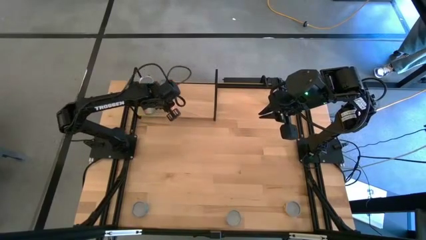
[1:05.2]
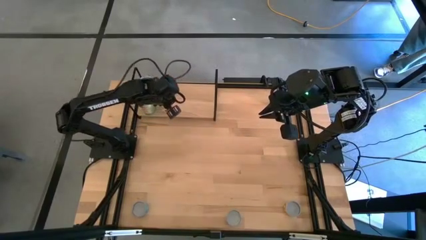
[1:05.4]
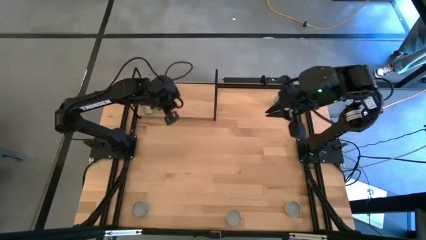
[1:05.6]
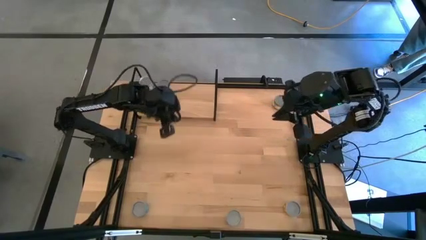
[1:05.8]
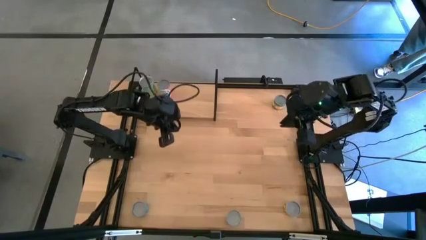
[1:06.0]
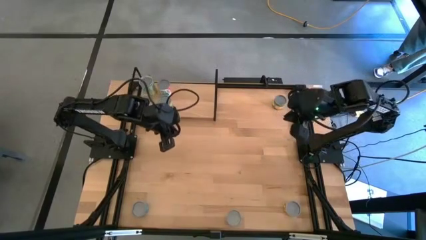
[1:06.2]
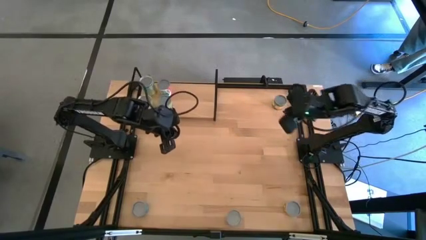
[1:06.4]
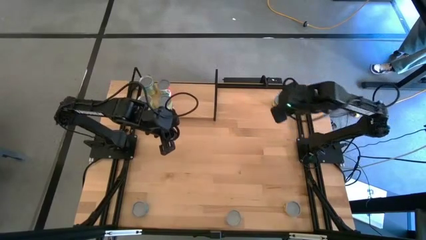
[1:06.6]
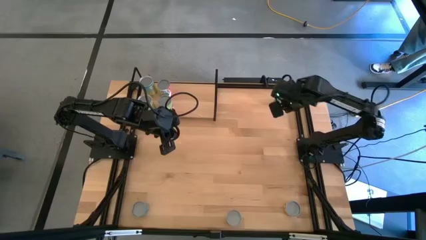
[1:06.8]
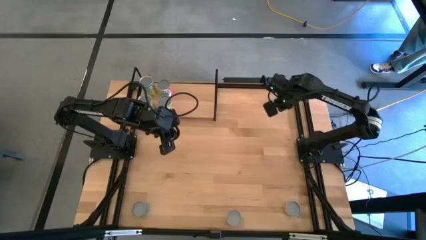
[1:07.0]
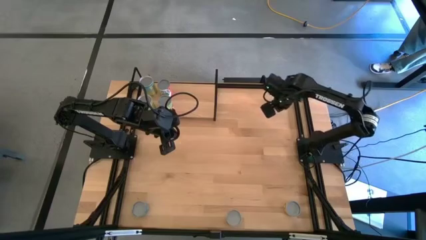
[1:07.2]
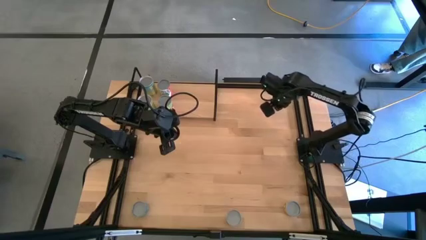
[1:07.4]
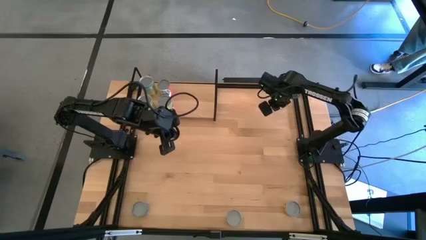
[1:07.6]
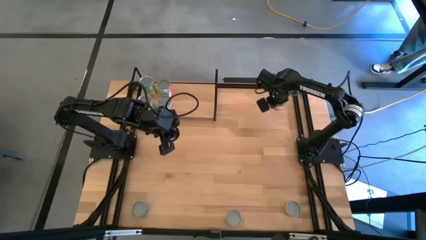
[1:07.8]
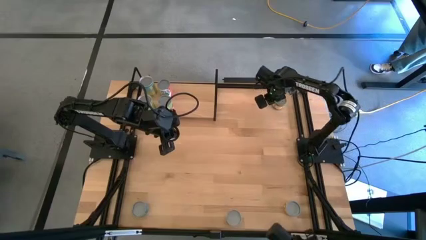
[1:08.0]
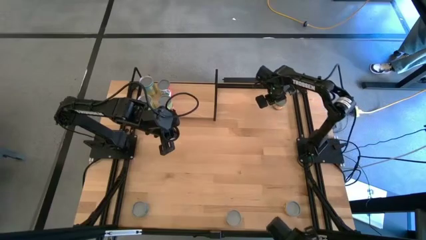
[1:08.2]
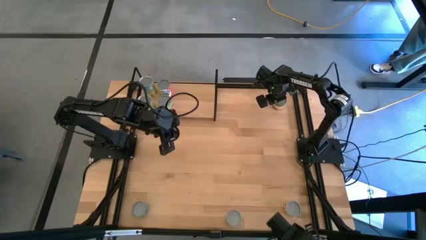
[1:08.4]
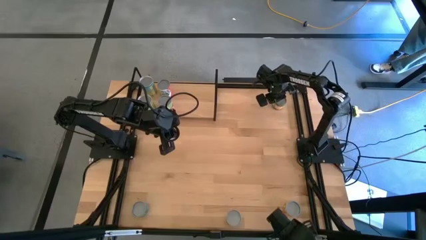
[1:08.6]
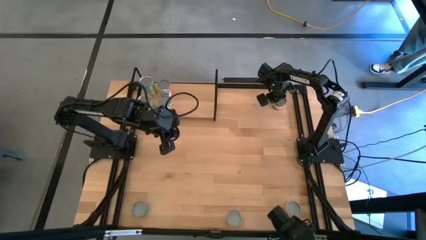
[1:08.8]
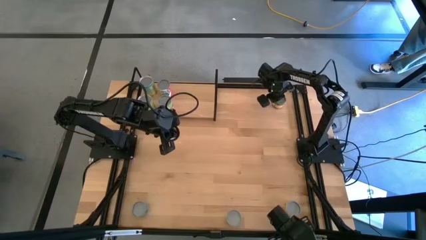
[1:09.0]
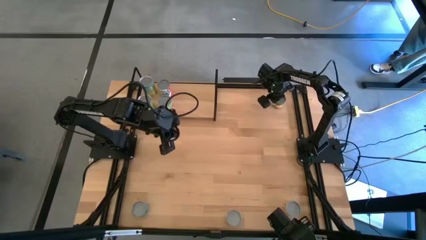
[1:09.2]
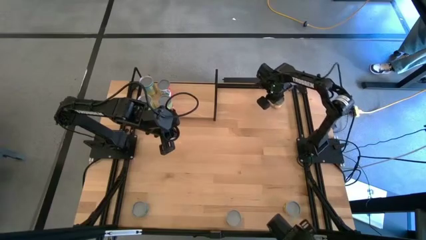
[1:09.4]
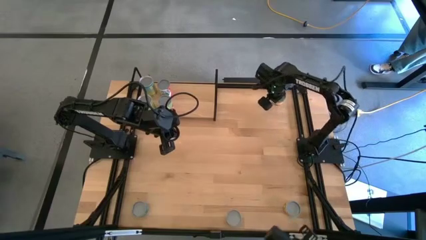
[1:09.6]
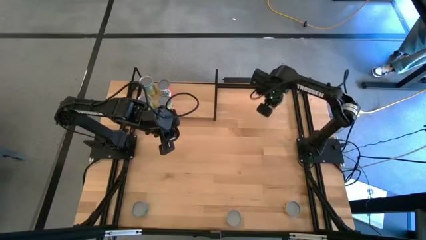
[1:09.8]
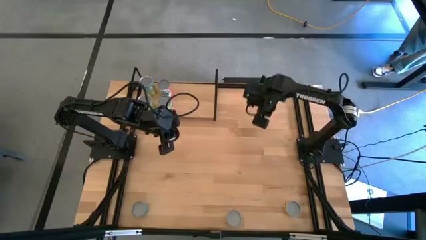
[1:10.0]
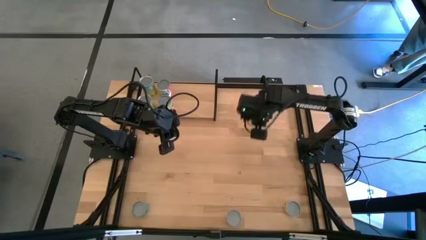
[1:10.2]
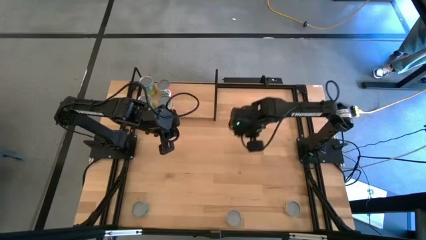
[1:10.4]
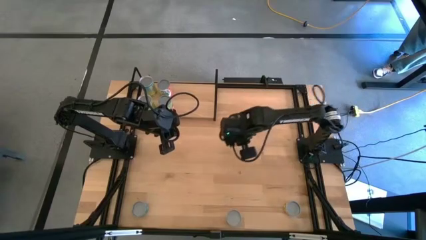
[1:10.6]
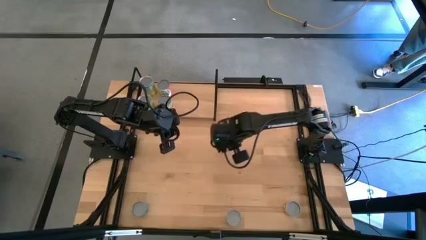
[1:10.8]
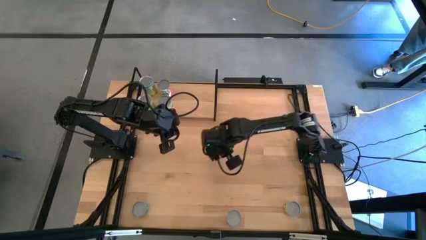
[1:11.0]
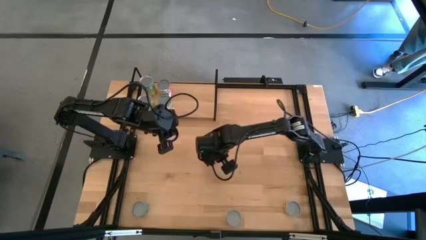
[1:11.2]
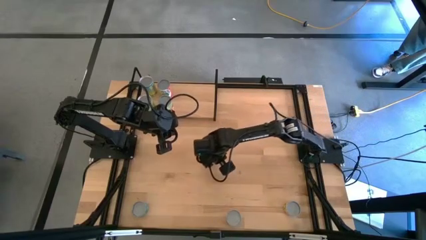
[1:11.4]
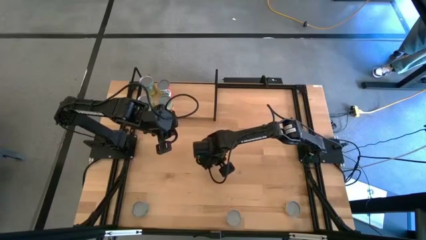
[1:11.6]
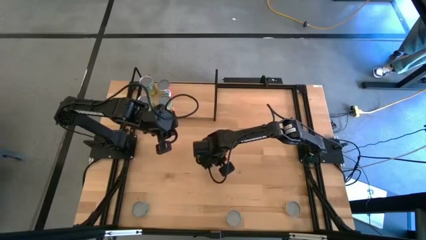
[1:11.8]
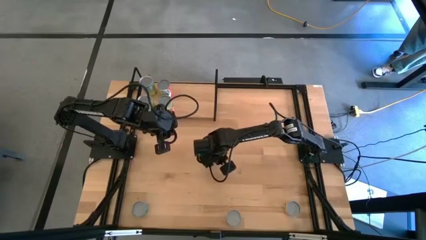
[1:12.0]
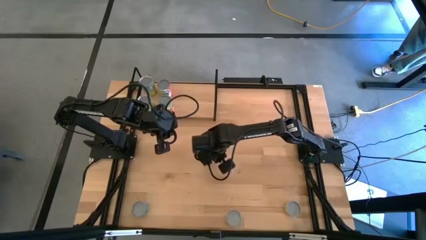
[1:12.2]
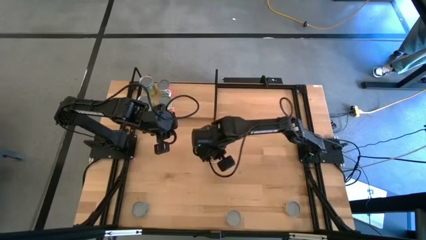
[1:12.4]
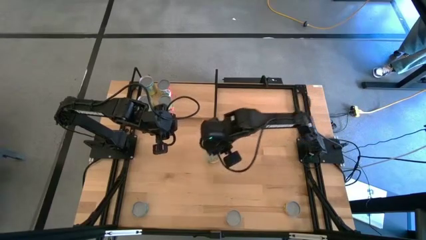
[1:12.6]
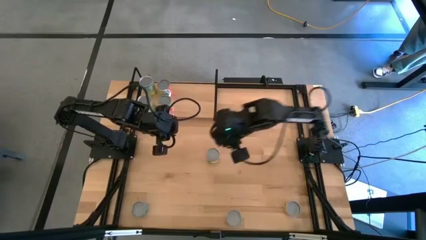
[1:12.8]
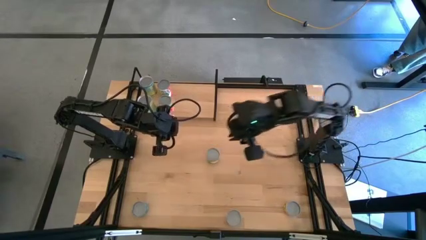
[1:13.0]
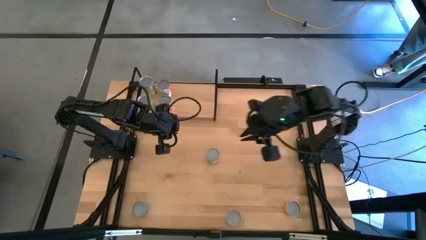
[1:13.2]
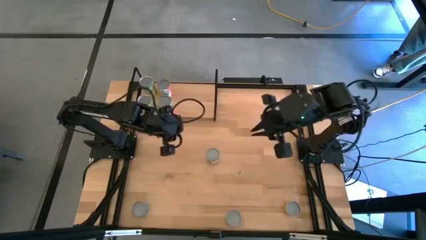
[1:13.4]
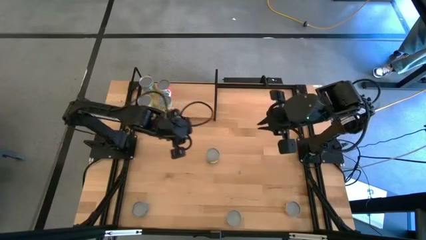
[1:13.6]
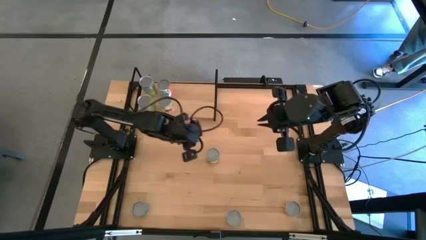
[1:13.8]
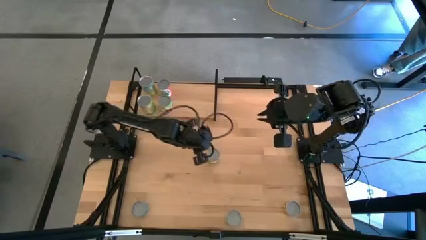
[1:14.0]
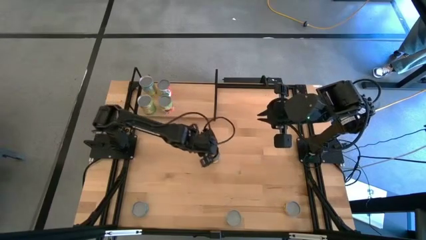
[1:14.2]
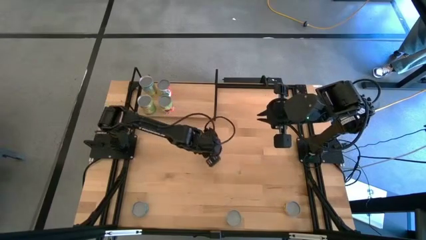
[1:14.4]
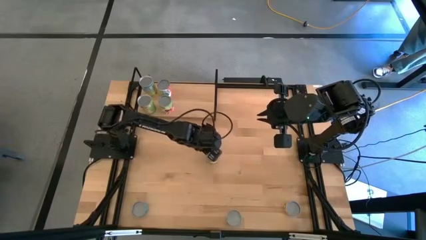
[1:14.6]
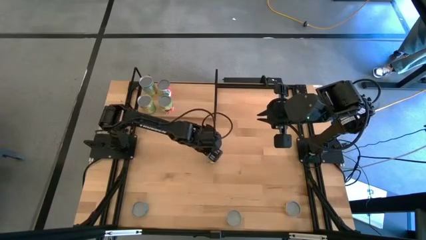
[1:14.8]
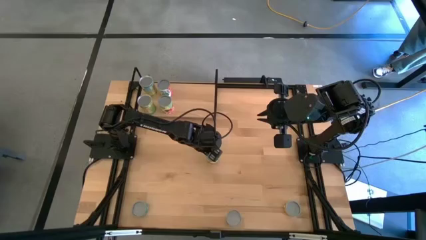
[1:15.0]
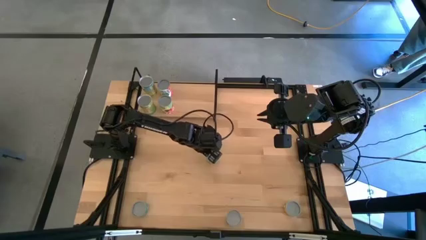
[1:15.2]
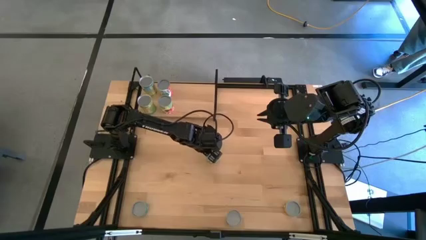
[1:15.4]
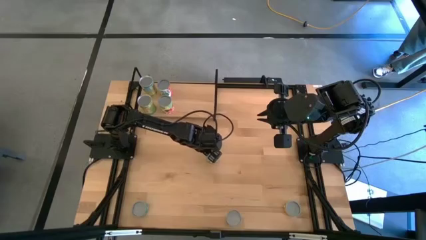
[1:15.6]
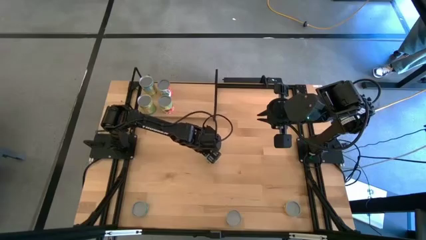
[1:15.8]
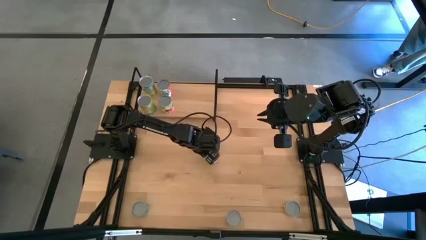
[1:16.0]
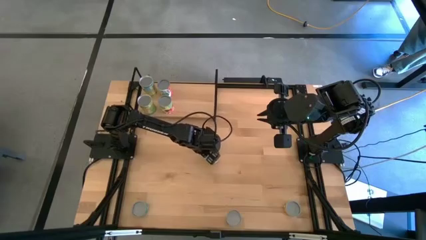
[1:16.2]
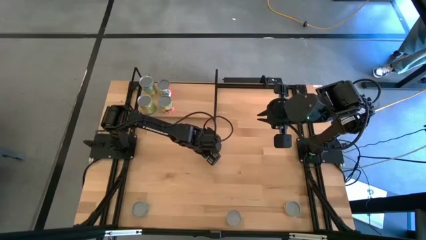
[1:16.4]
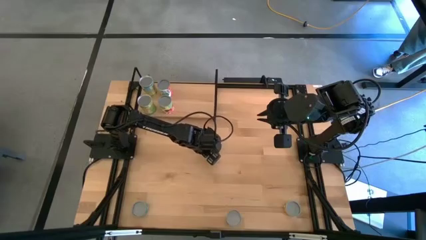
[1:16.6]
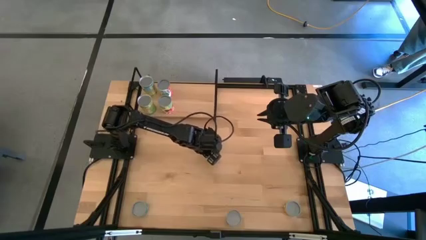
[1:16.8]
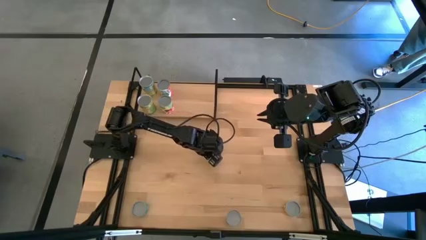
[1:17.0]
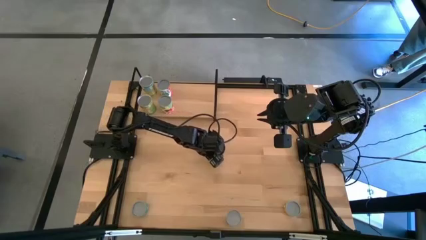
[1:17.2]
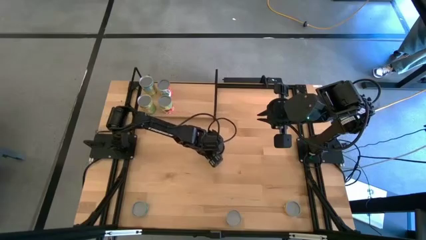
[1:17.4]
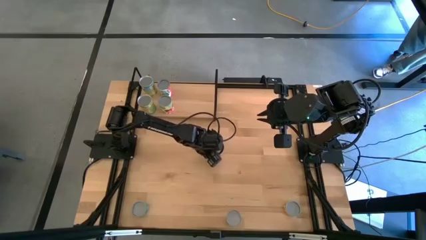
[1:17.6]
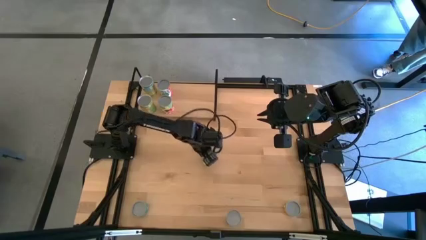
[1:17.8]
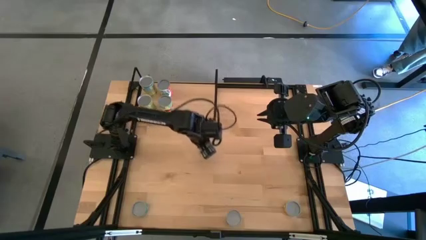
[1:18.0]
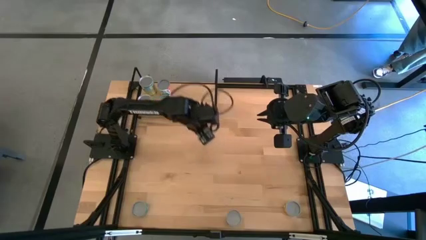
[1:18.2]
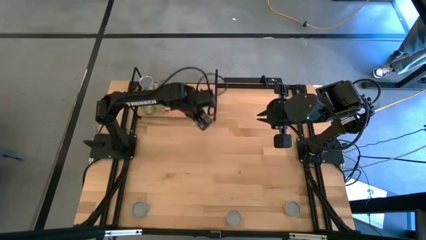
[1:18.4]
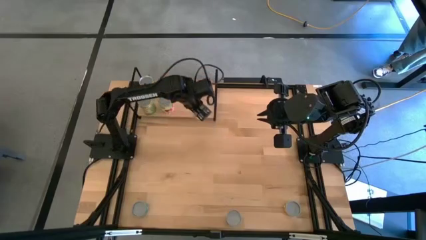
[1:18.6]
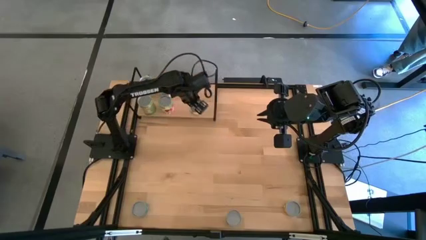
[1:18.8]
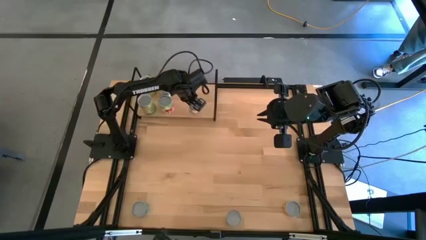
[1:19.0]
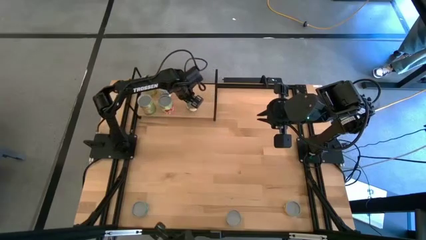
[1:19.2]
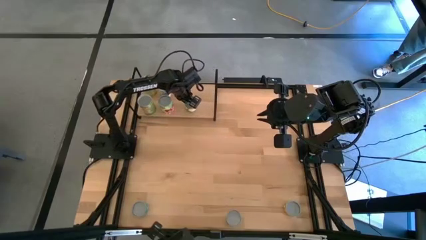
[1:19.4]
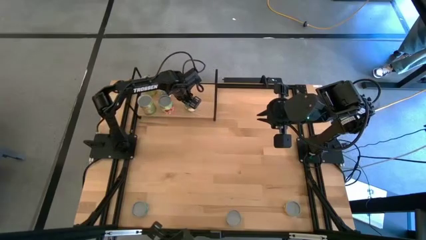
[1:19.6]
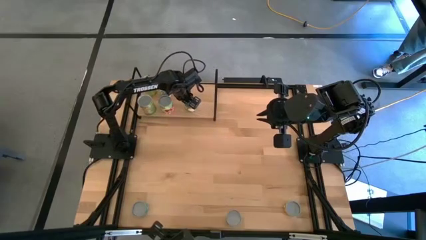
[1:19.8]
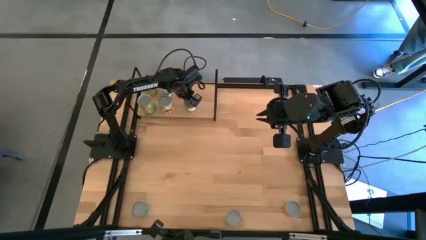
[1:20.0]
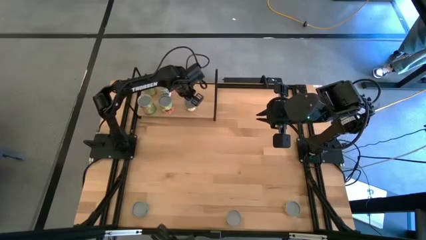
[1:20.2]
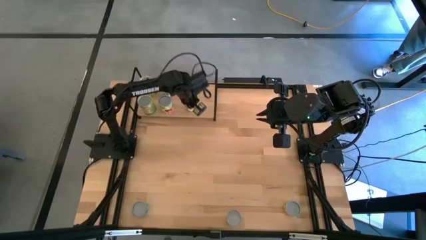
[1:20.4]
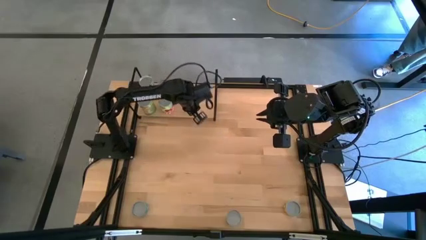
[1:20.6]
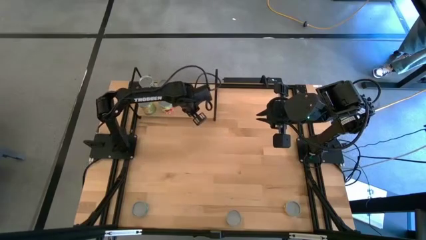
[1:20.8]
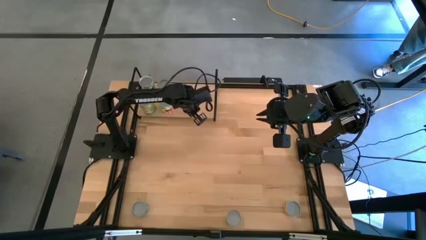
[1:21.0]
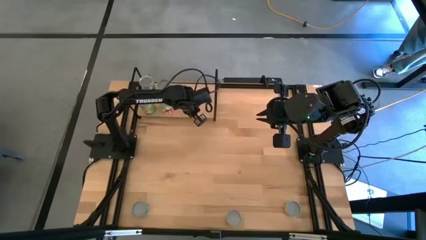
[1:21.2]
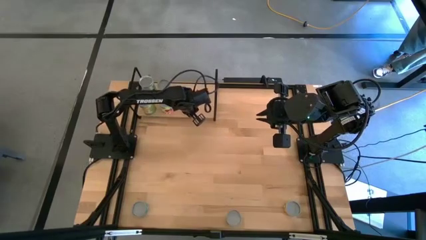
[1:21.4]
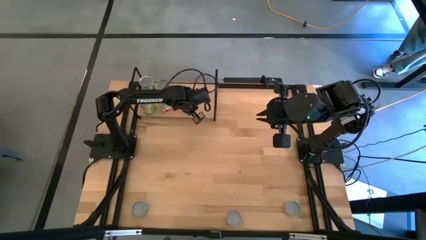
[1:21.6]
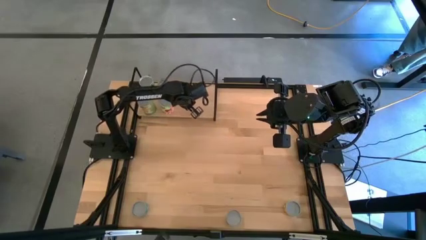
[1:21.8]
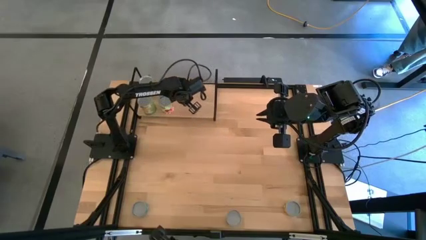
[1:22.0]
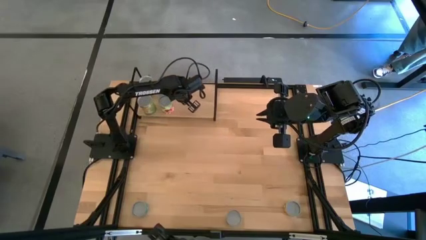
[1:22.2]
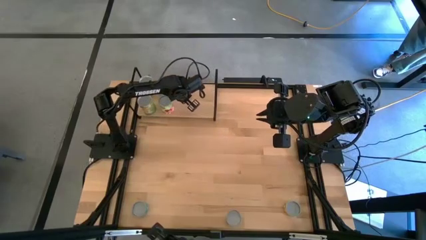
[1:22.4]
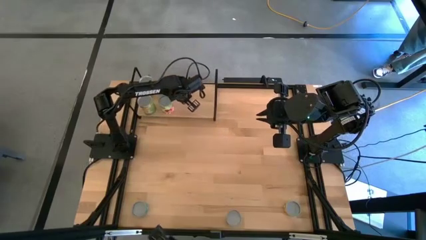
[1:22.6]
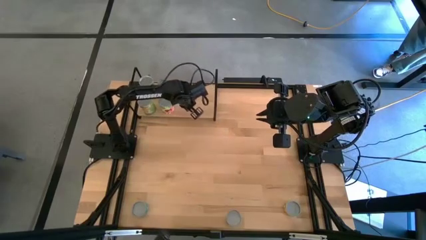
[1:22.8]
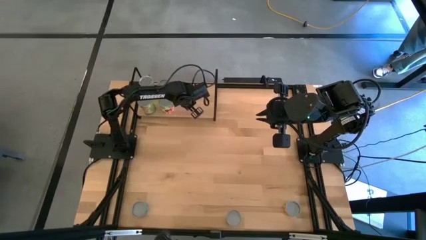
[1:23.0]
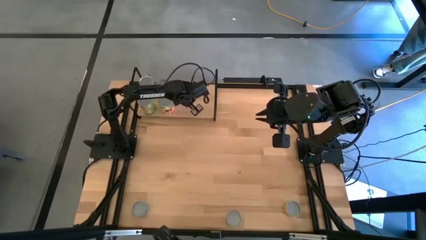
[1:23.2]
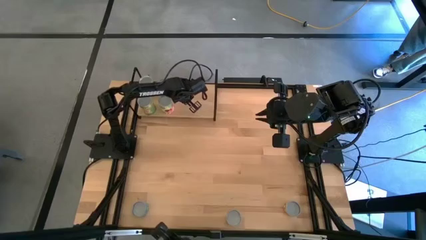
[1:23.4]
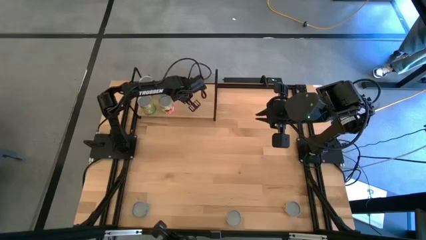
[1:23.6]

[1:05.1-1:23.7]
Task: Pick and place cans onto a shelf
Put the canned sliced peaches on the shelf
